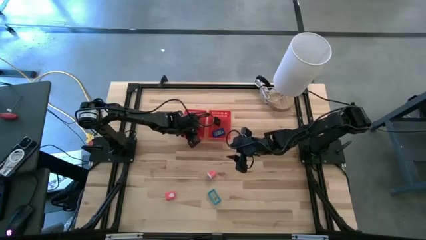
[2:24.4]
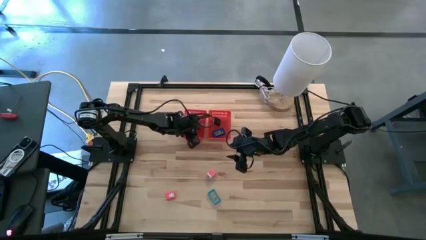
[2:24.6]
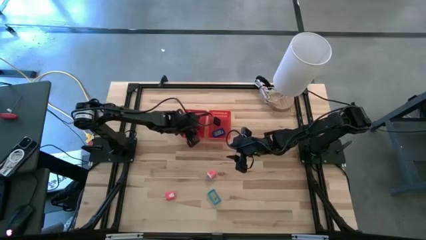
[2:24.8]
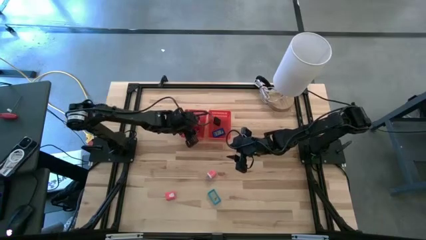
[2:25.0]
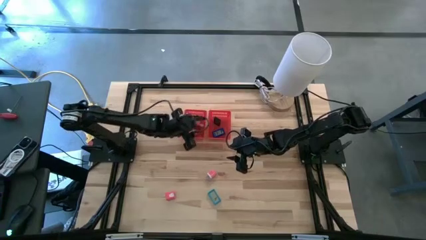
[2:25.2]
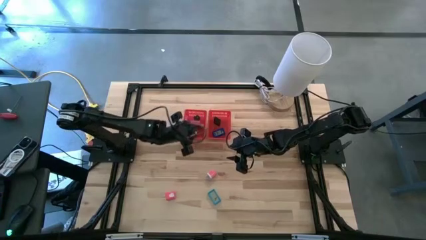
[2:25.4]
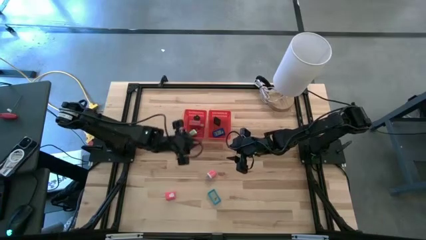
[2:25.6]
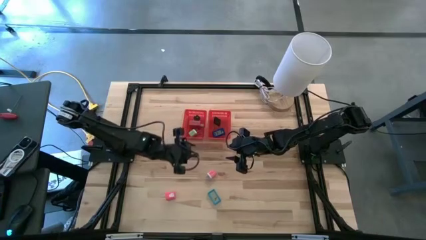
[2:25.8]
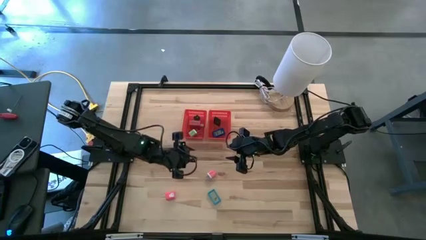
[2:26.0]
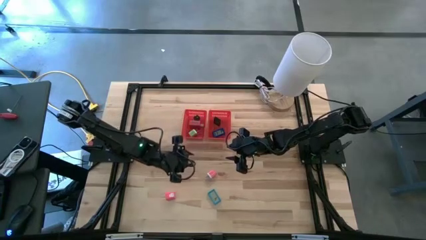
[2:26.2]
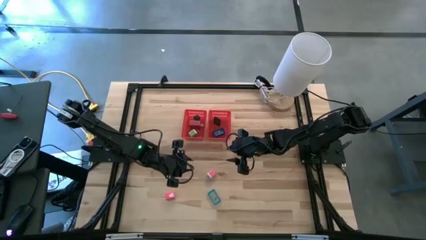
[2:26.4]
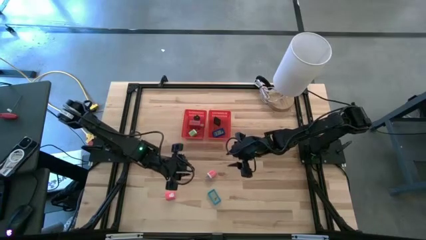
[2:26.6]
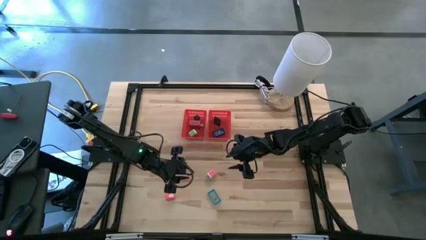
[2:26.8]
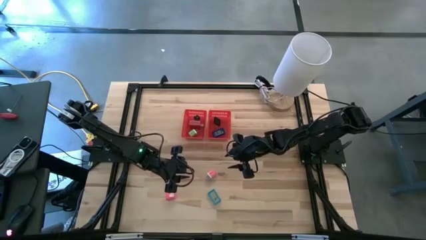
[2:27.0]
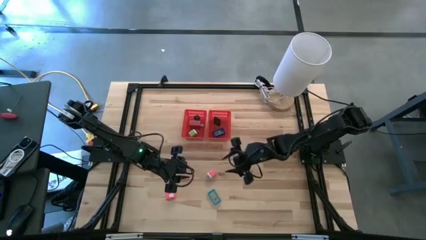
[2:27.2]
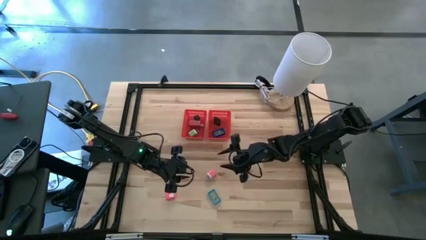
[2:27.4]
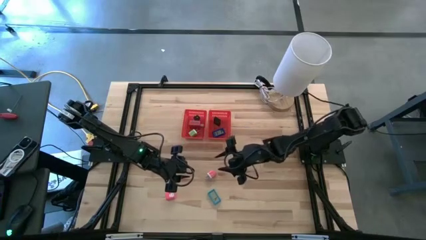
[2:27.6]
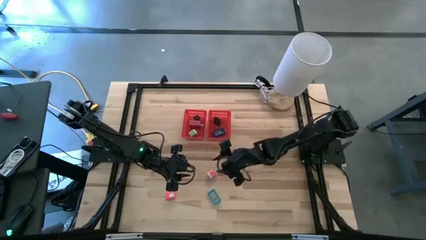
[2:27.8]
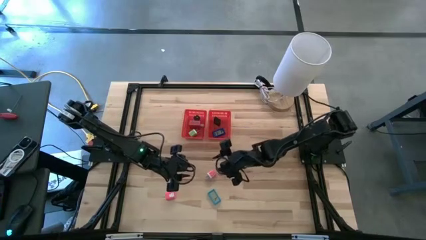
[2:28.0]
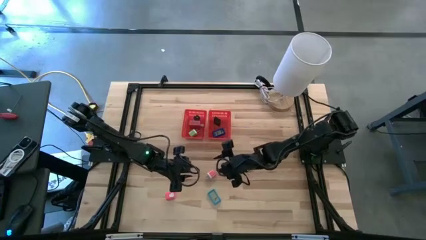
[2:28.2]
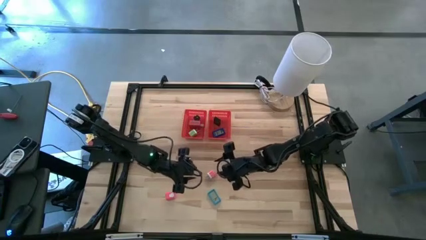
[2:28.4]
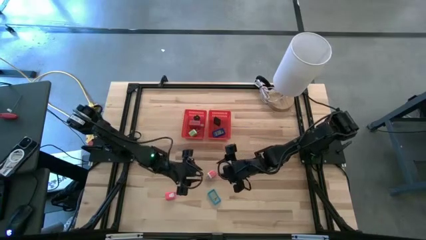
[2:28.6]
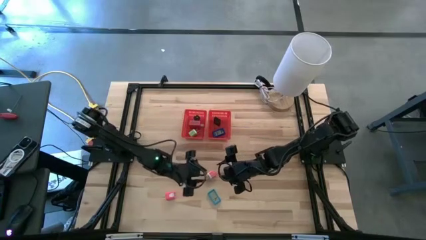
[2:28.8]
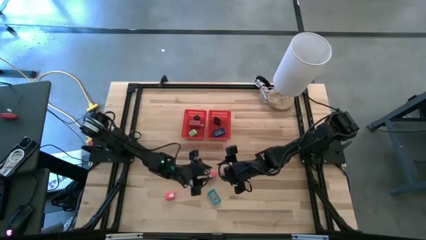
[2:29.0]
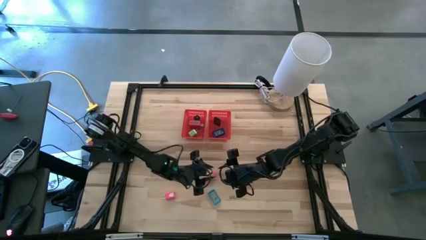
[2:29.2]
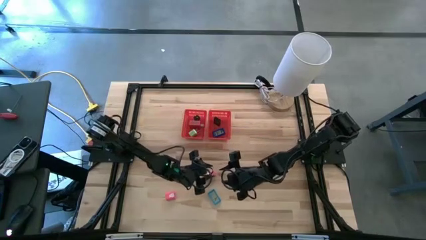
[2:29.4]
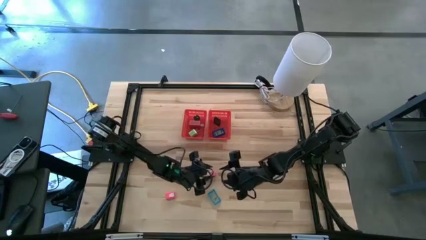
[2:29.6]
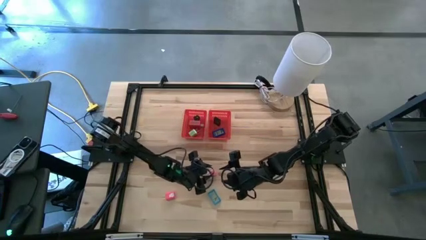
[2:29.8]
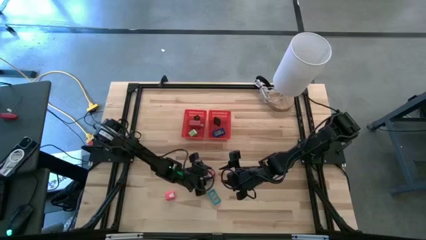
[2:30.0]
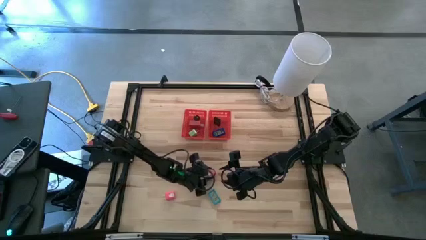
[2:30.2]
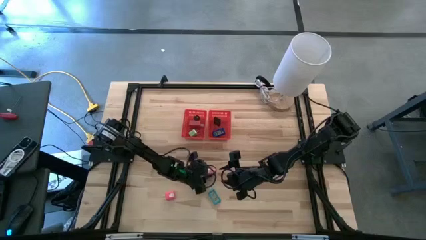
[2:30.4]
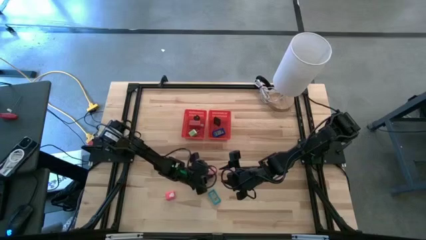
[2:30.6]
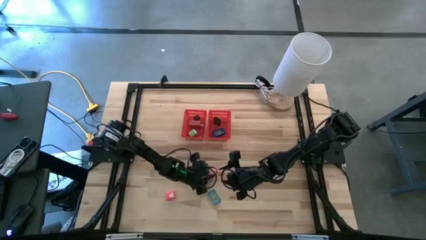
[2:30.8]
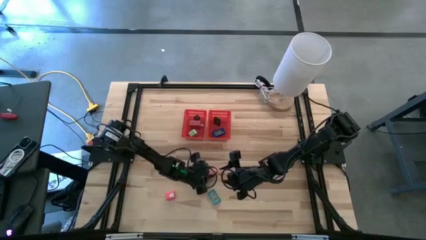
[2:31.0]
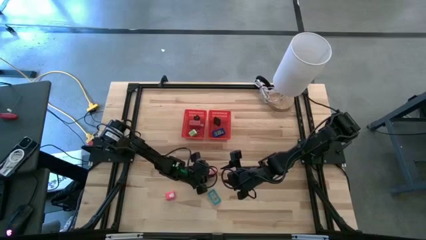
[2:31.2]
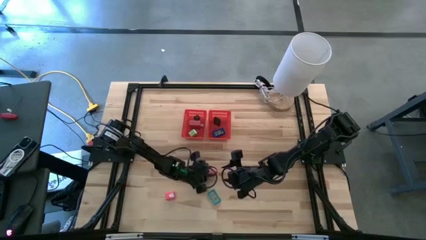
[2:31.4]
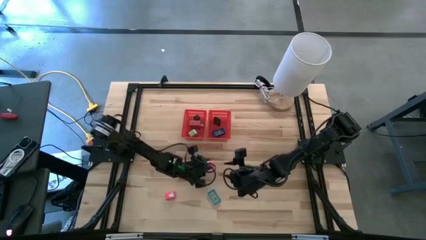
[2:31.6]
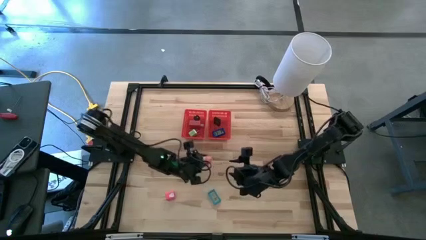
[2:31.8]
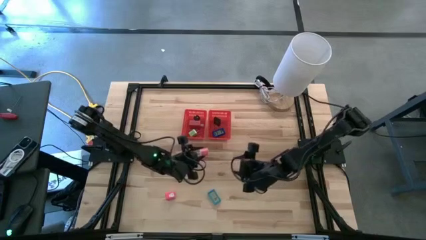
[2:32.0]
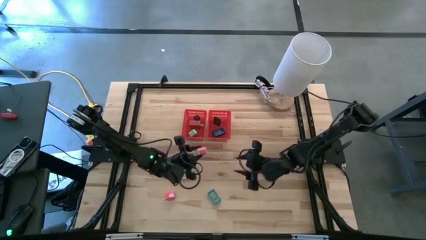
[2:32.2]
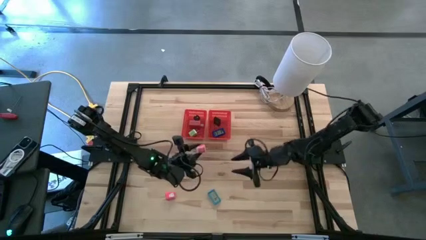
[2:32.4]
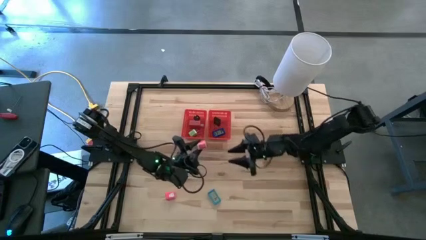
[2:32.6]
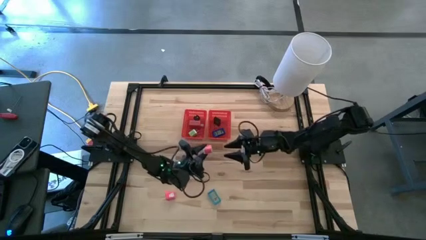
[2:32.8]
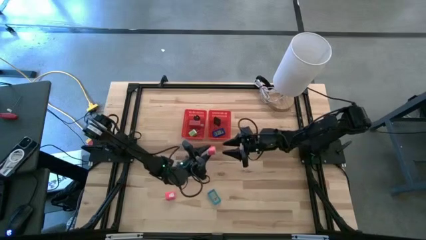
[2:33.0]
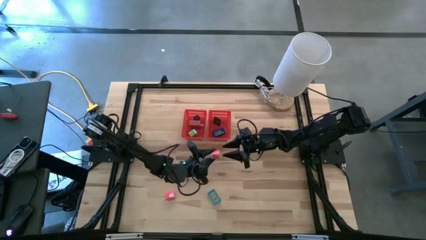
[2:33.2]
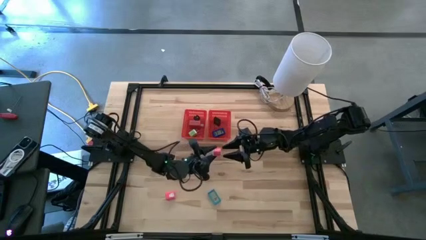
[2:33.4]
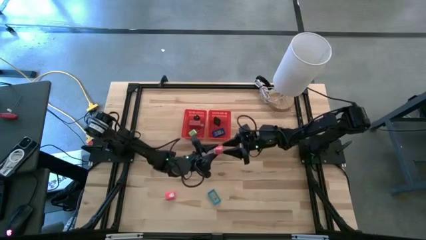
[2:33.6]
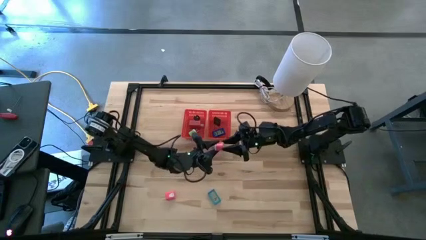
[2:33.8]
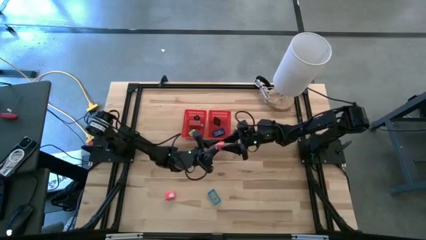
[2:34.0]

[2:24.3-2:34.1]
Task: Pick & Place Office items
Put the pink white charger adapter into the left red bin

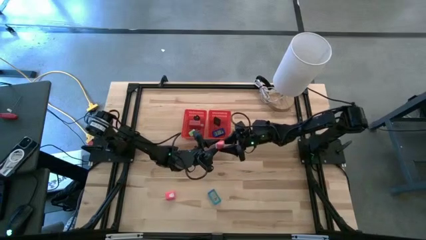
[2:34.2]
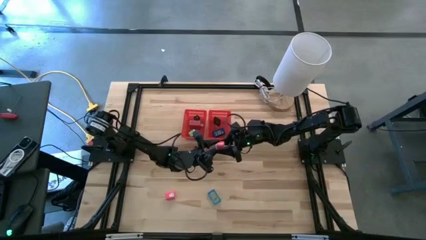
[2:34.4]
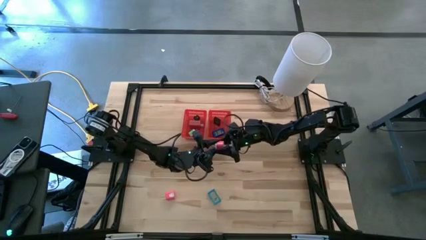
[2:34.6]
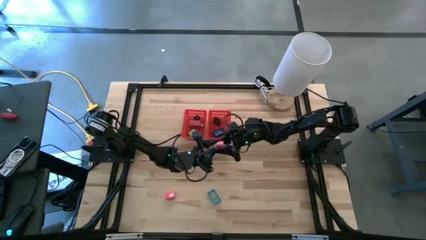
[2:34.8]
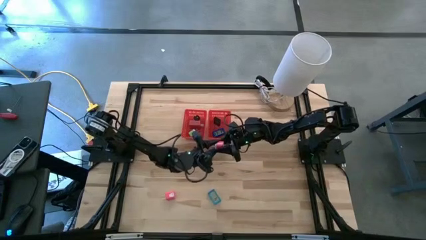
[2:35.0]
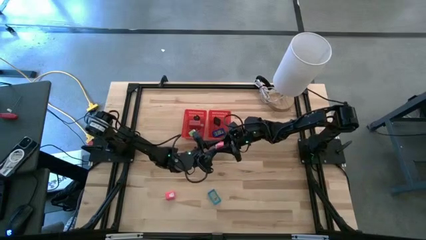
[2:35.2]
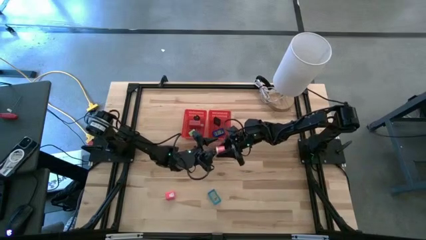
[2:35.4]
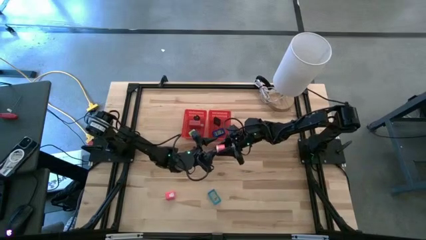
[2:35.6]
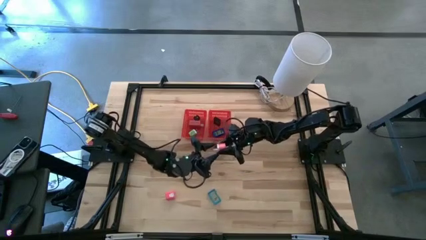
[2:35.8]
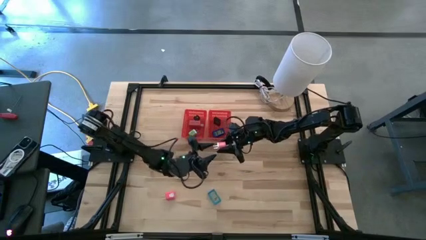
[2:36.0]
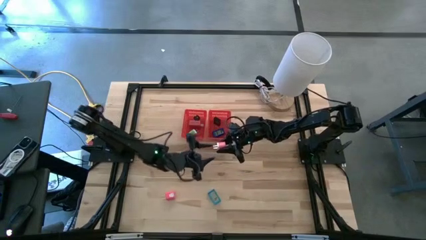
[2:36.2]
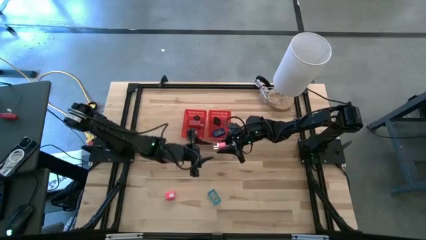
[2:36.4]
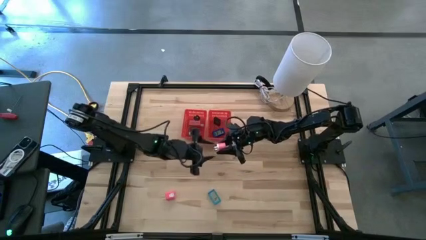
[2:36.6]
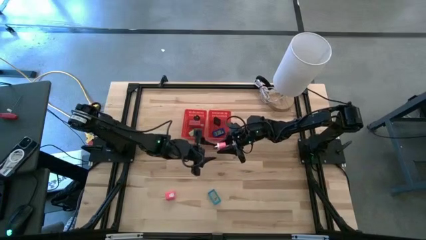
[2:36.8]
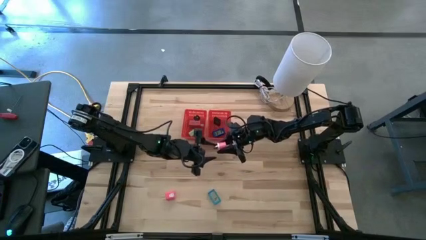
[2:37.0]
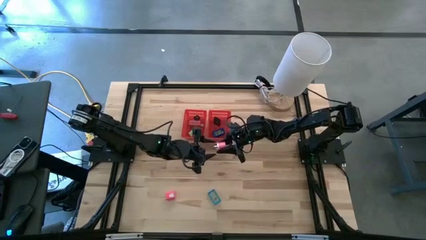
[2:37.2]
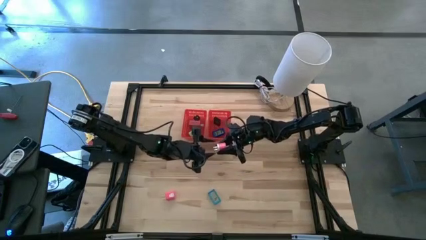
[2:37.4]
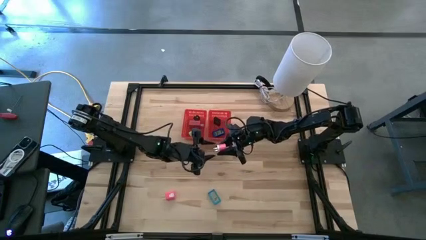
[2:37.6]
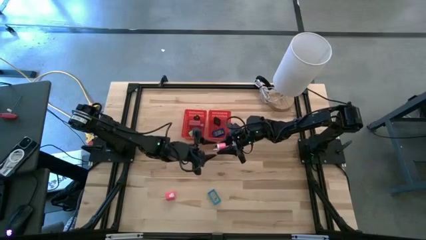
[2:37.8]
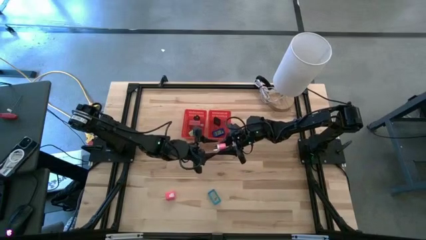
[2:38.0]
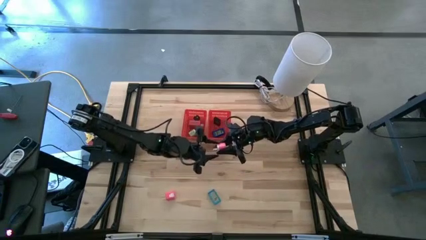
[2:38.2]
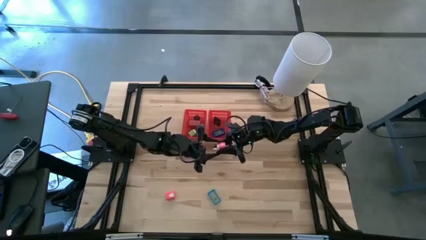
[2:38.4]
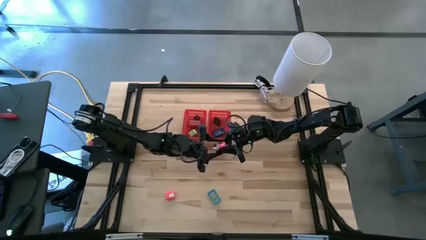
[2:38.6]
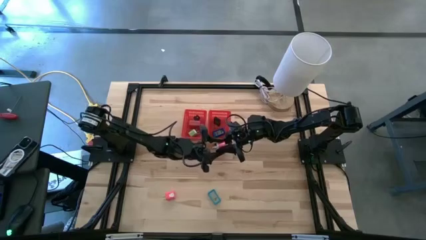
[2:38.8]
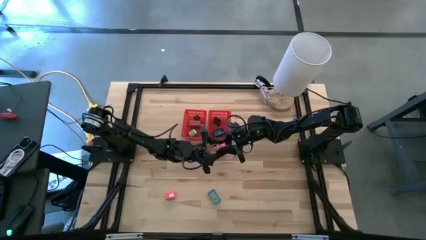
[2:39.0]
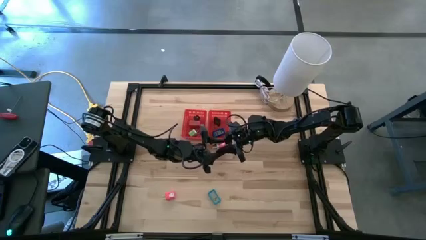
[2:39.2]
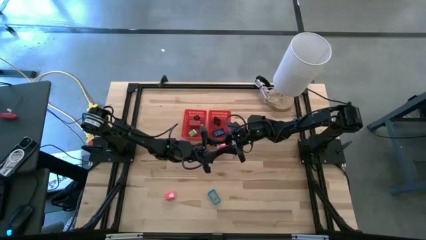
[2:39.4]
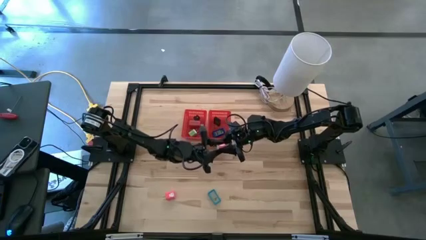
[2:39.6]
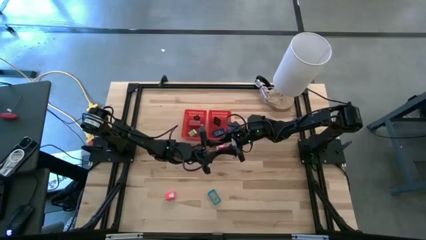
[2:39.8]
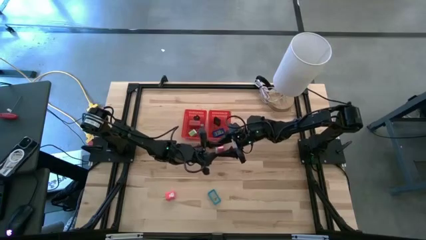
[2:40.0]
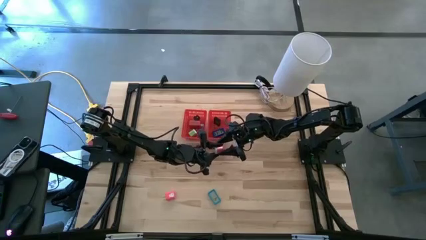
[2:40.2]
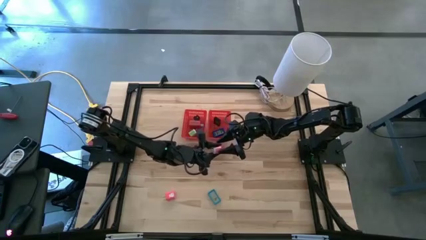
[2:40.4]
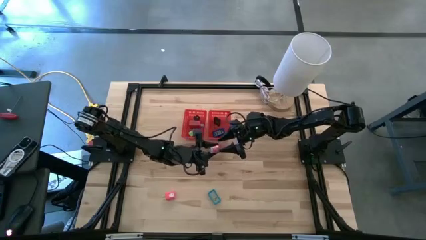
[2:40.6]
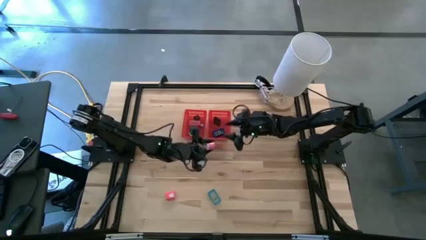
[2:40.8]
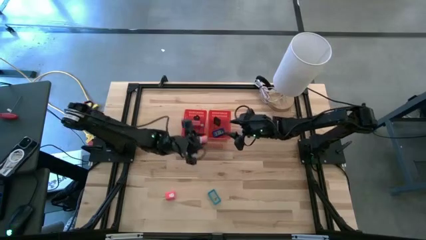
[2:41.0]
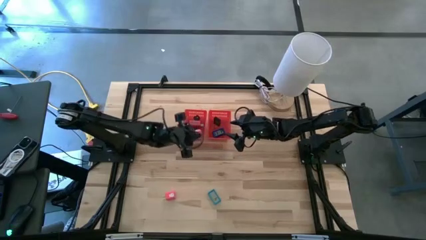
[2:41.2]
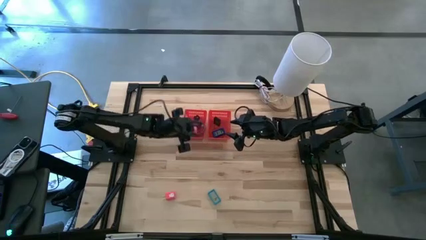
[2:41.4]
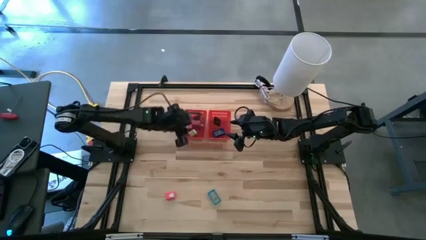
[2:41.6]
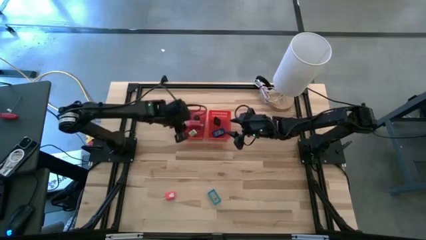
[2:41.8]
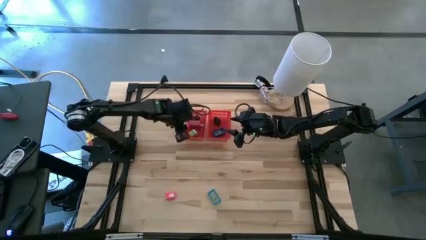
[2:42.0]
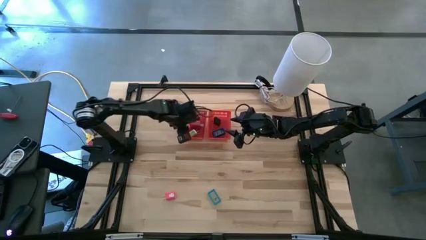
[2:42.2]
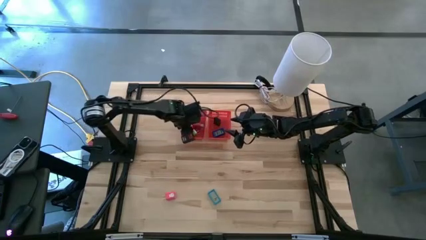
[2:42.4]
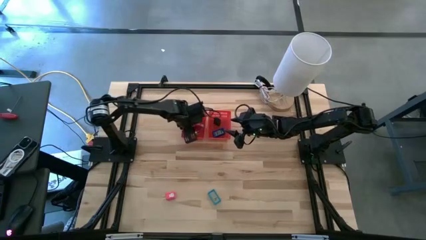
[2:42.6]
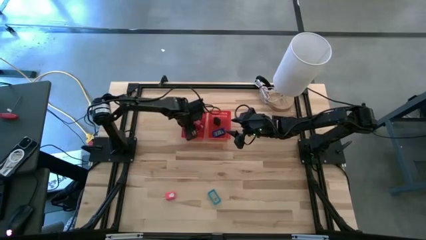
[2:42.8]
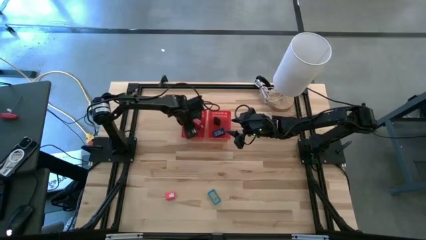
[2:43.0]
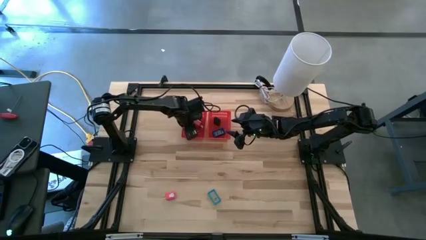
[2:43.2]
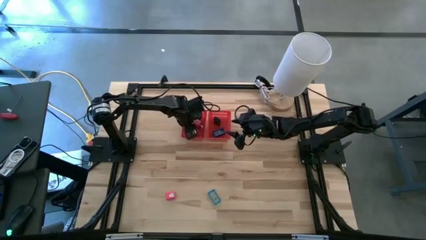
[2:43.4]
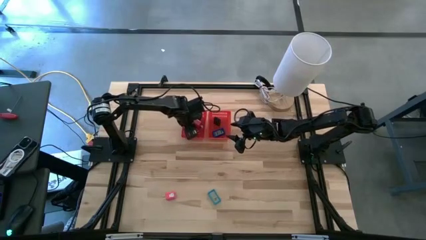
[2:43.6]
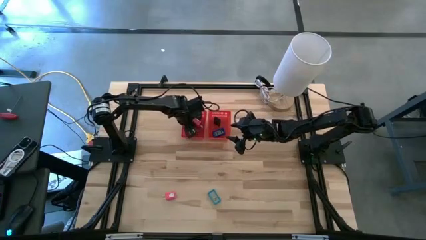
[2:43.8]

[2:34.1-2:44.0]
Put the pink white charger adapter into the left red bin
